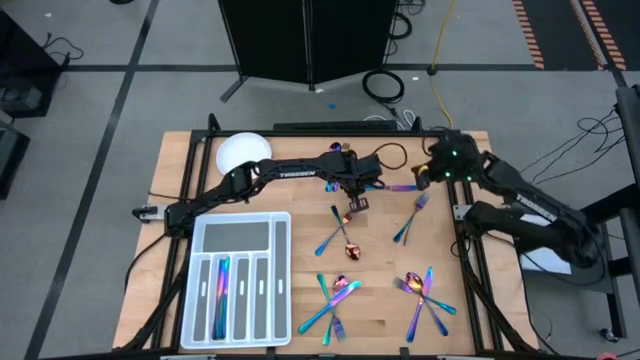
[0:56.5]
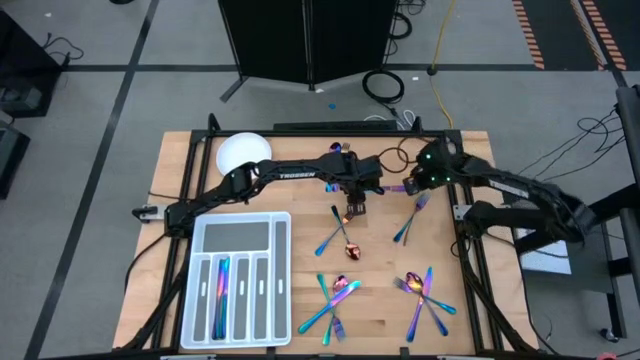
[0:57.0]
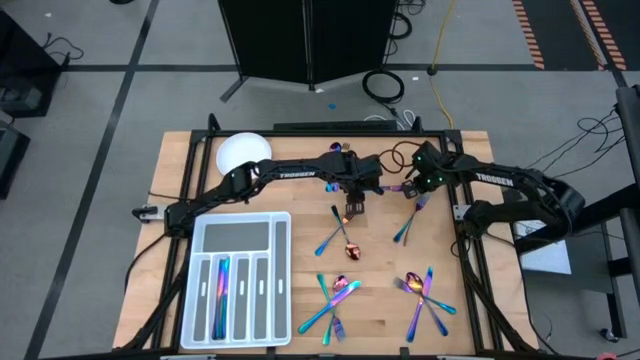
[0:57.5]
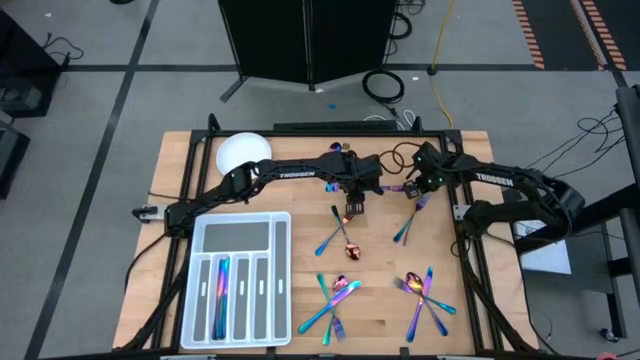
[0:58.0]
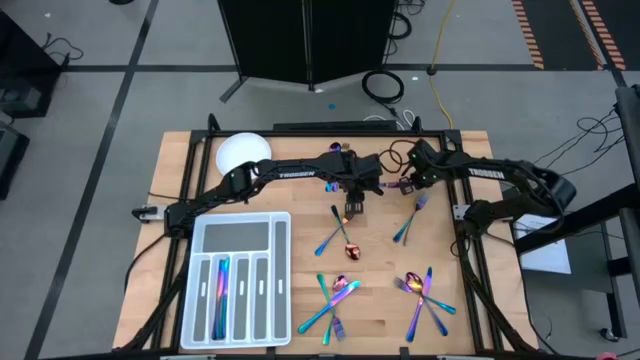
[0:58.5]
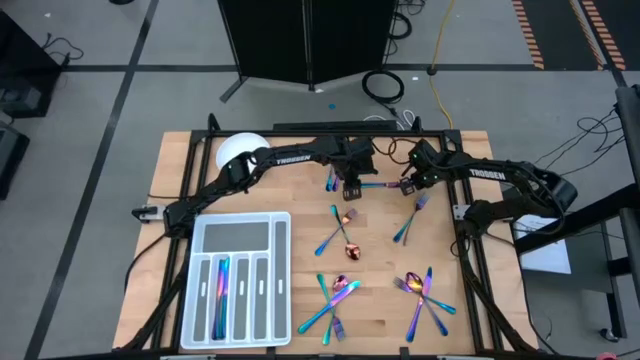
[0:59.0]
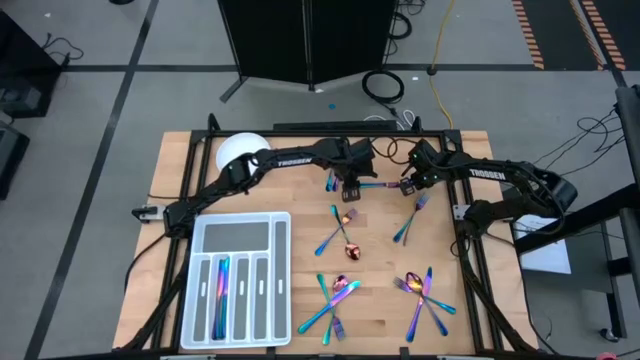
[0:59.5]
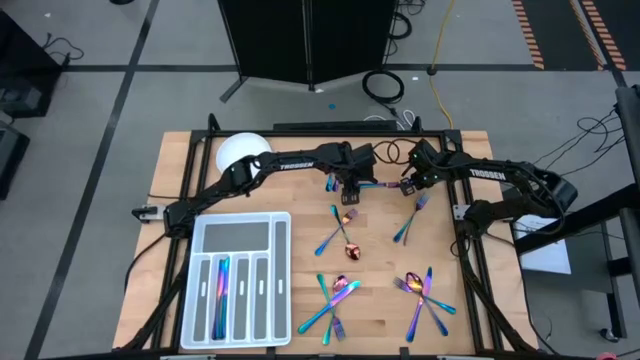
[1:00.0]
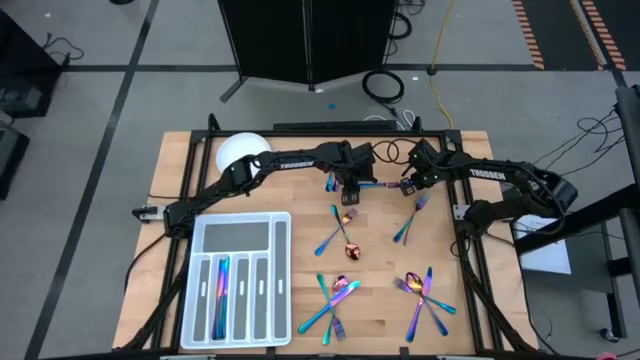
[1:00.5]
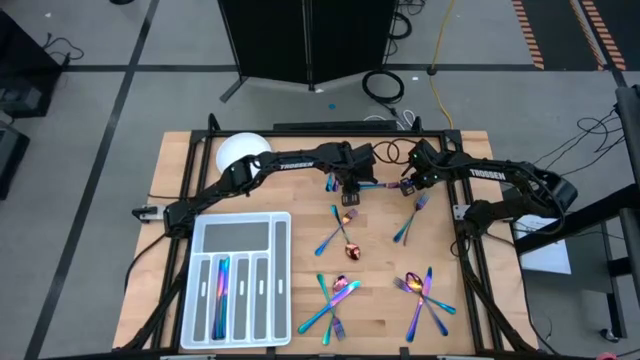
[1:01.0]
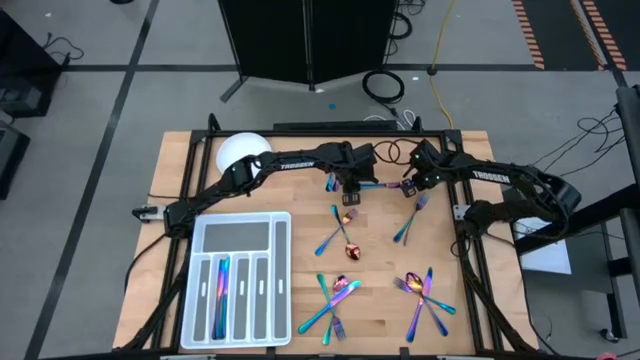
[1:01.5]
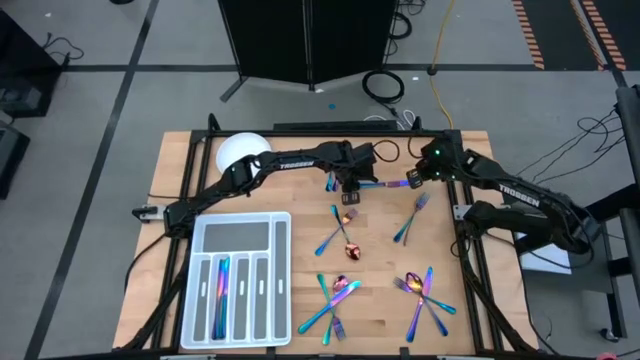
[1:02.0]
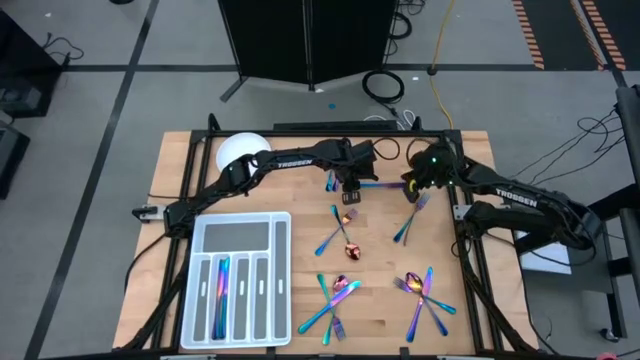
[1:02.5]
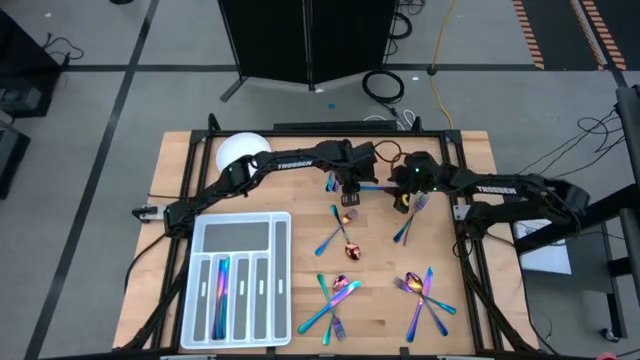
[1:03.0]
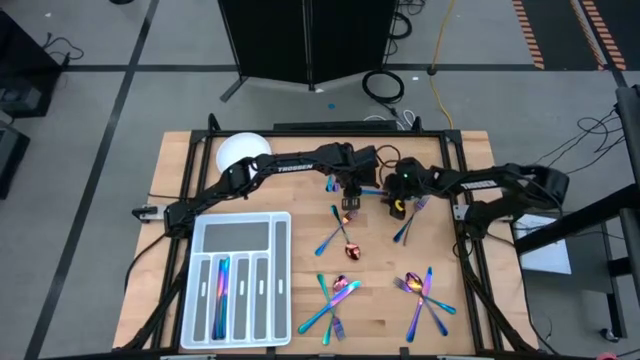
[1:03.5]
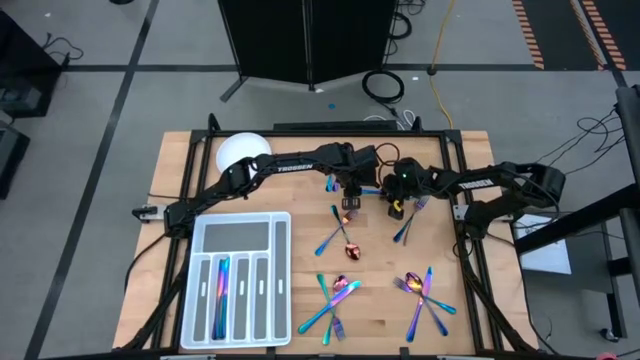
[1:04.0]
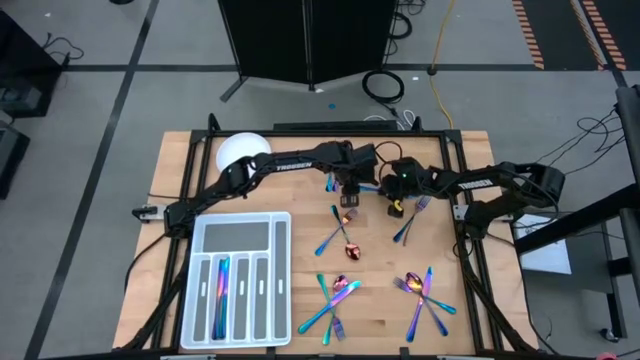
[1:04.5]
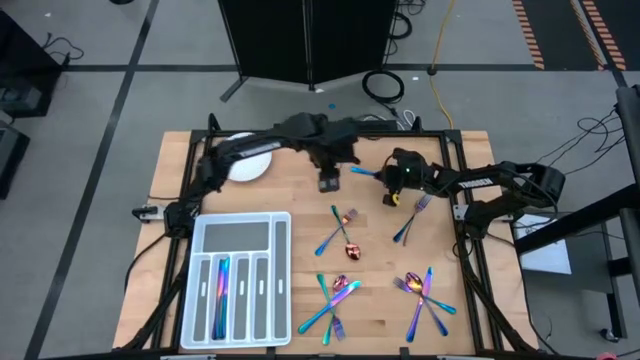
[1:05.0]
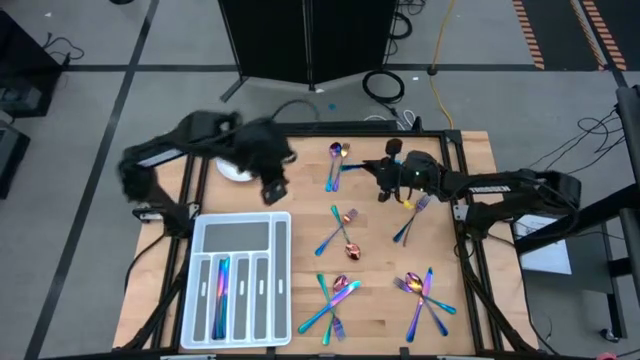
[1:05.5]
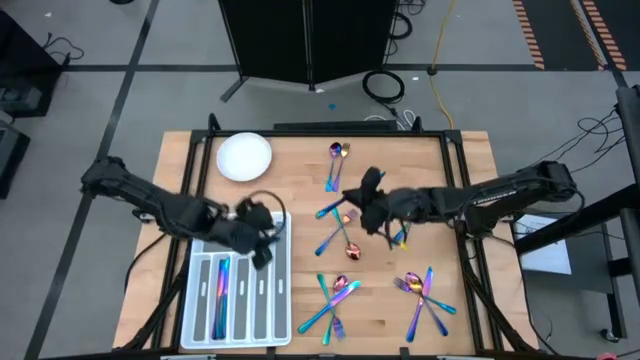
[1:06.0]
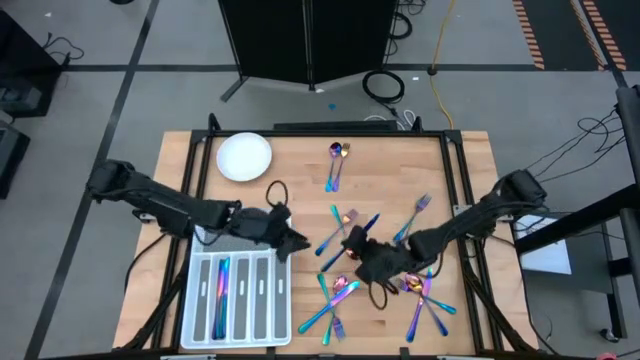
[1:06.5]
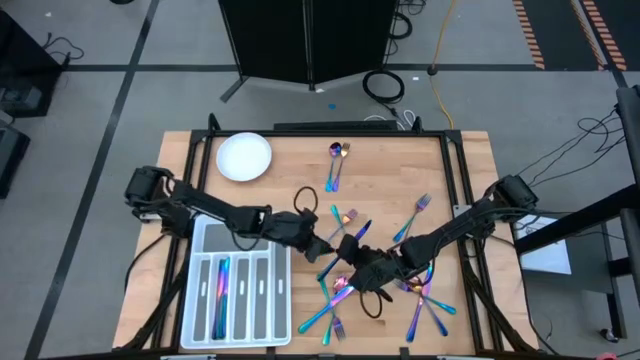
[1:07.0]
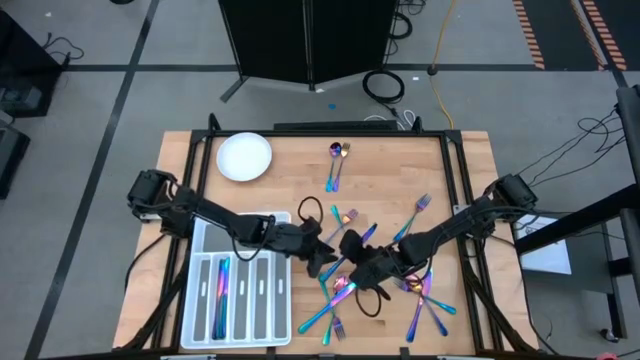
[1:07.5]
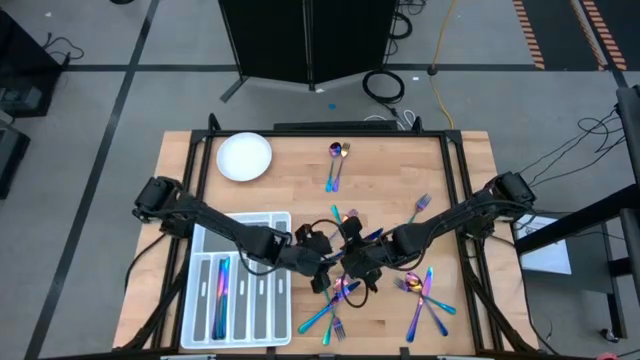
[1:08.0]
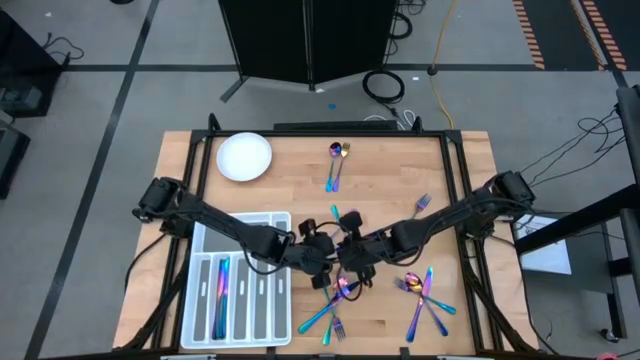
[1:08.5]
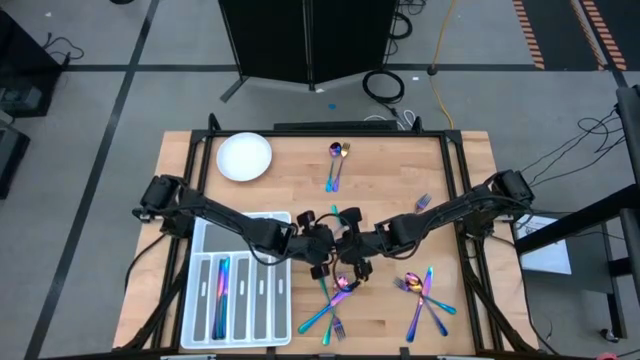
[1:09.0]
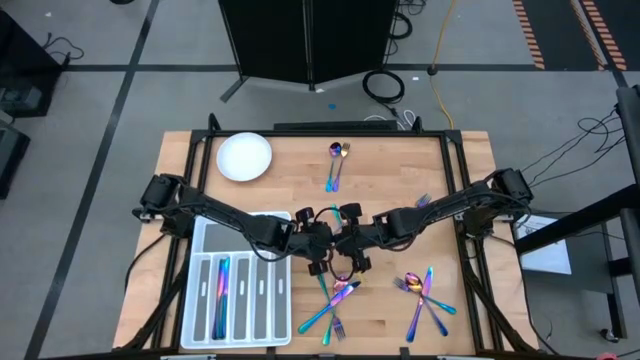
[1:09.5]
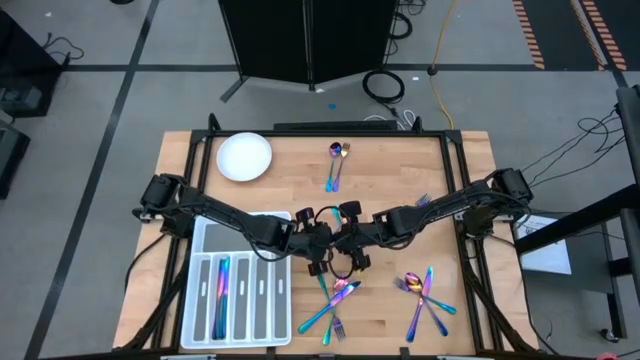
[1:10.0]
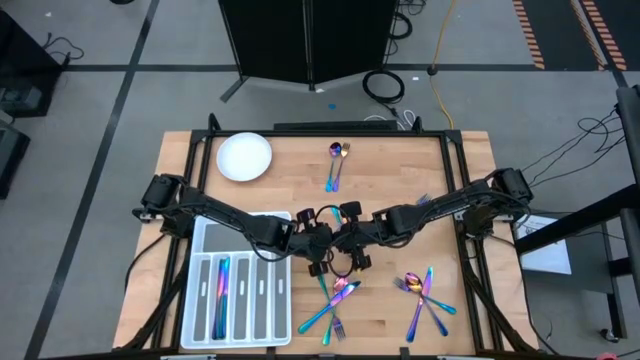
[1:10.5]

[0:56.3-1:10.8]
Task: Sort silverware
Put the iridescent blue knife in the silverware tray

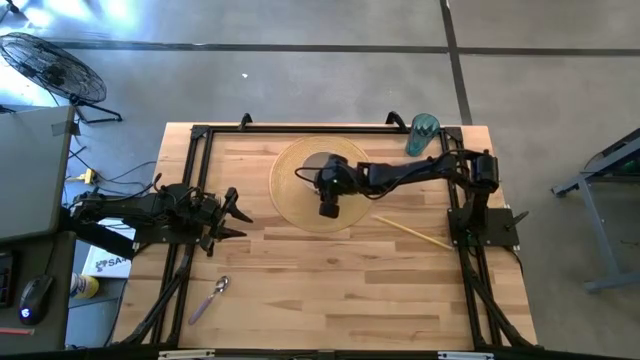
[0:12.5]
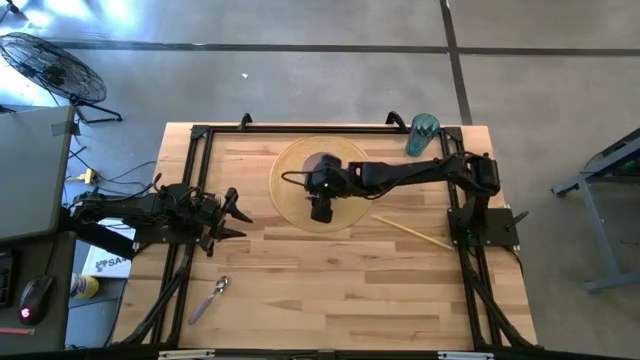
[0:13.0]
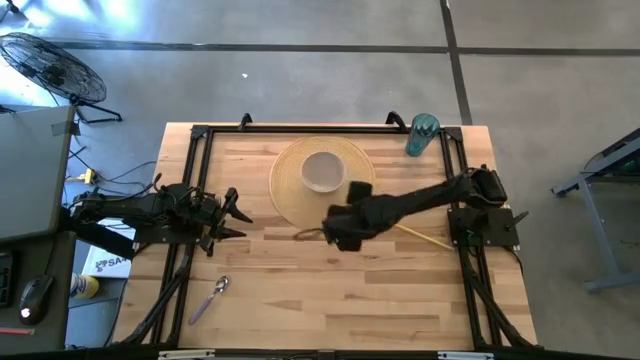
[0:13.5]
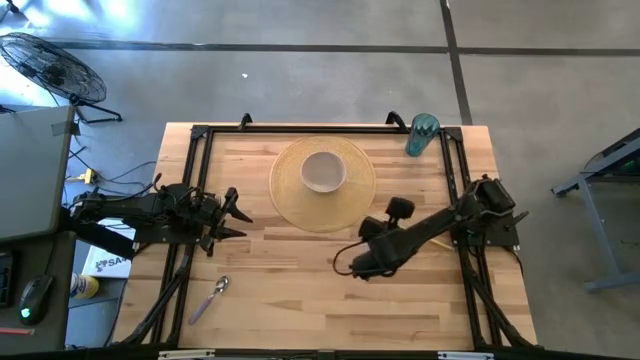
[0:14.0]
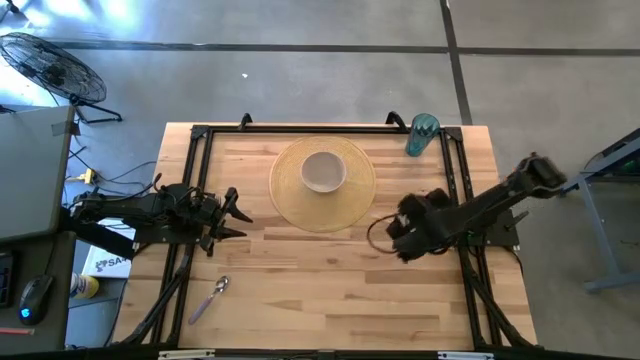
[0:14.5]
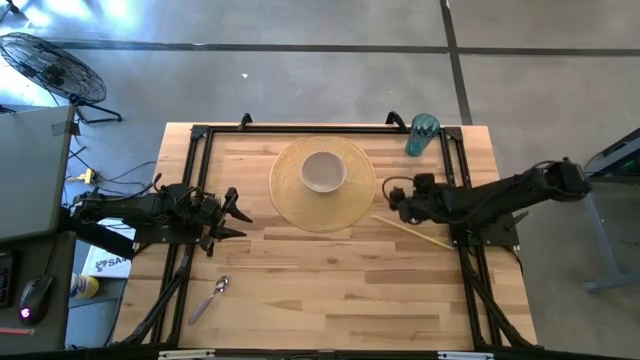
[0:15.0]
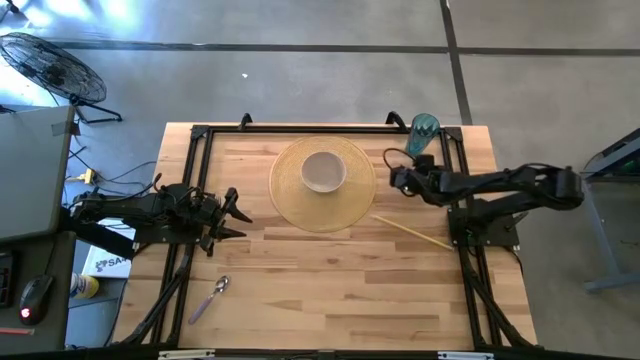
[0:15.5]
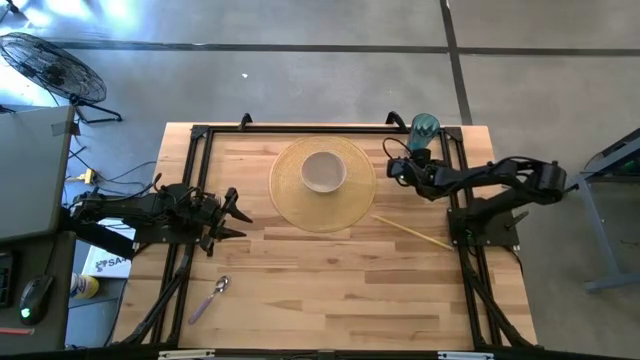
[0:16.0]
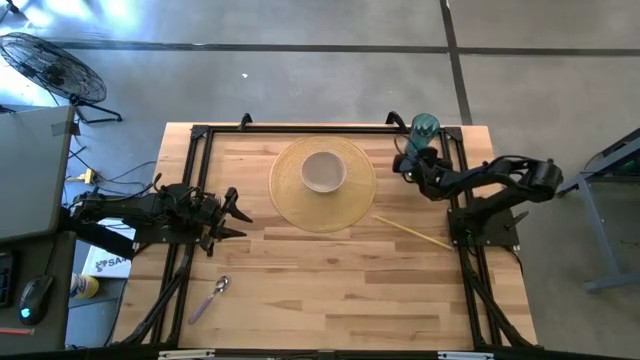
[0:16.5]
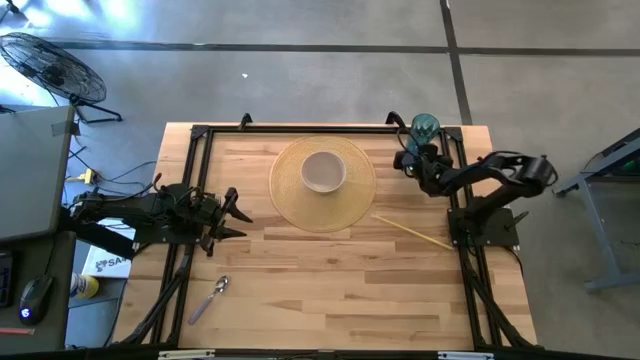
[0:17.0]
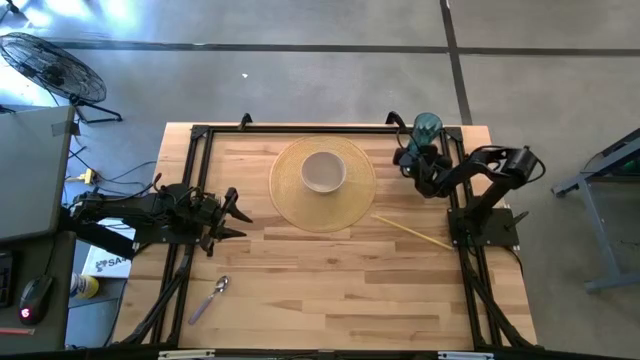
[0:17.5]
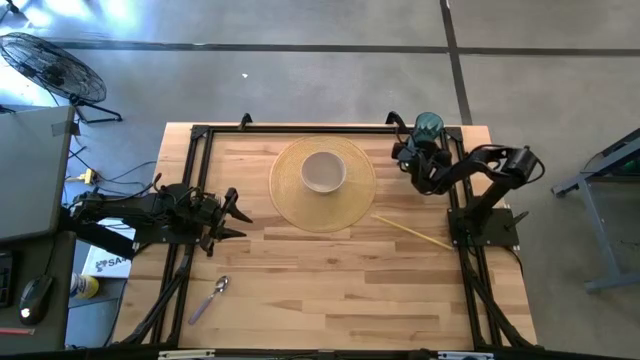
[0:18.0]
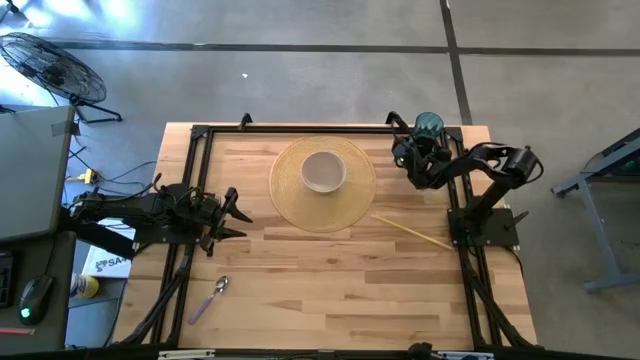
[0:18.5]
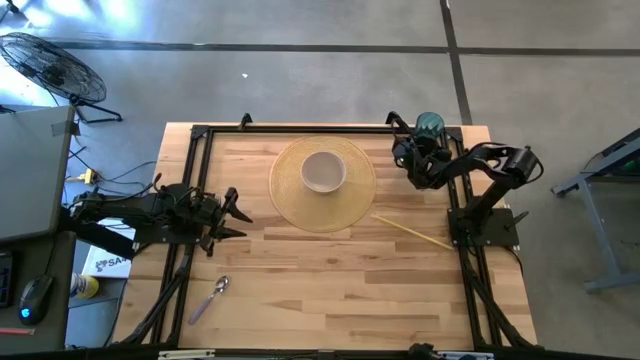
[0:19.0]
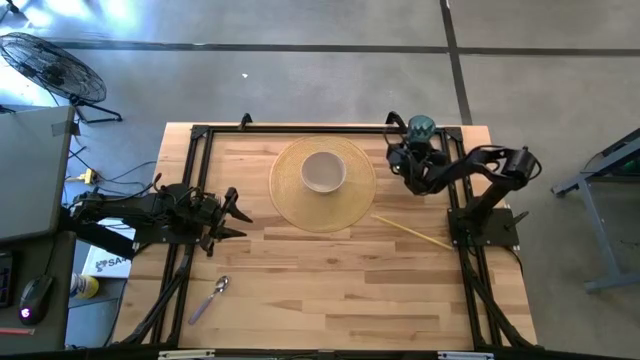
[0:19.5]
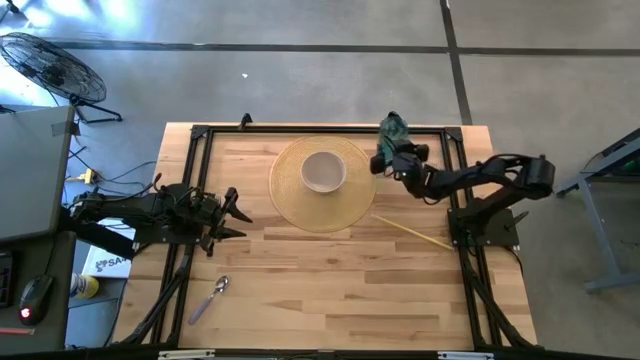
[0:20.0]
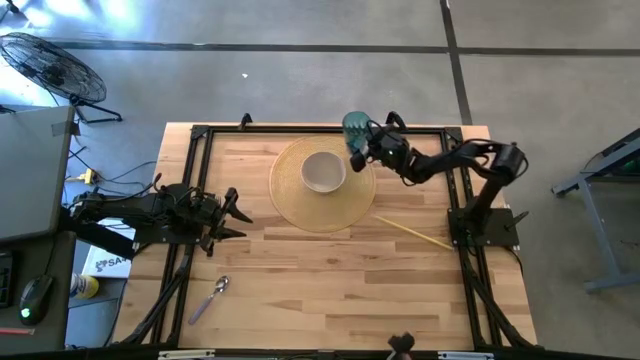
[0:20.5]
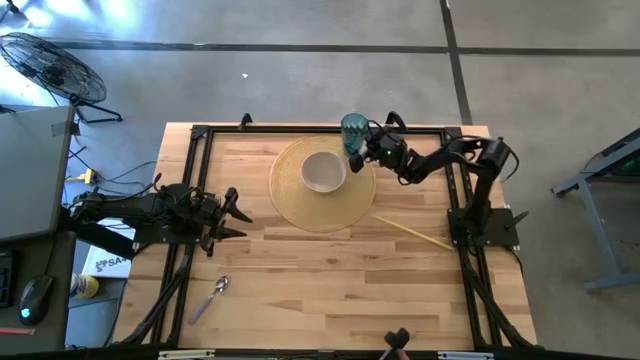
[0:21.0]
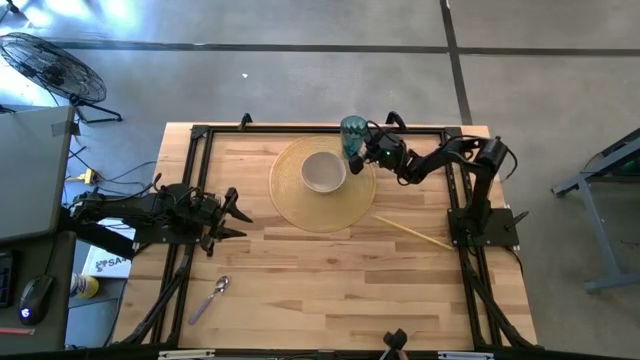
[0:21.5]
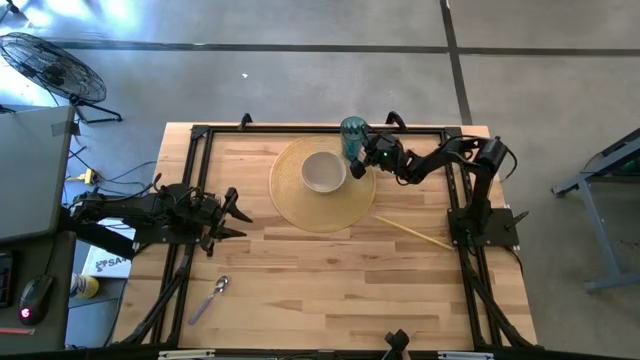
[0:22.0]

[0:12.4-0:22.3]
Task: Pick & Place Utensil
Put the blue cup into the top right of the white bowl on the brown mat
